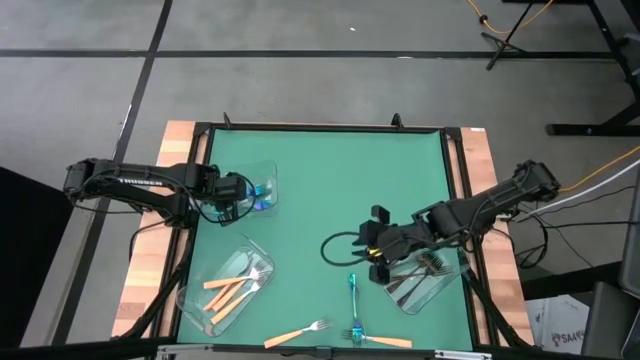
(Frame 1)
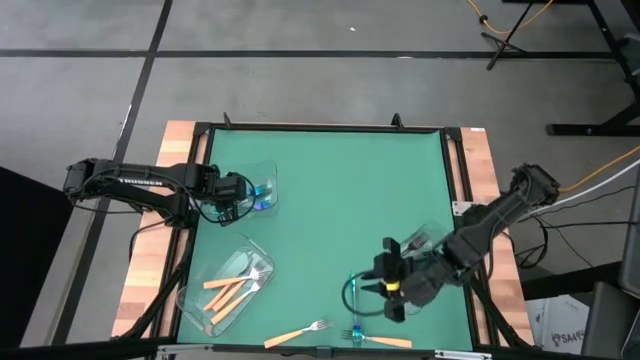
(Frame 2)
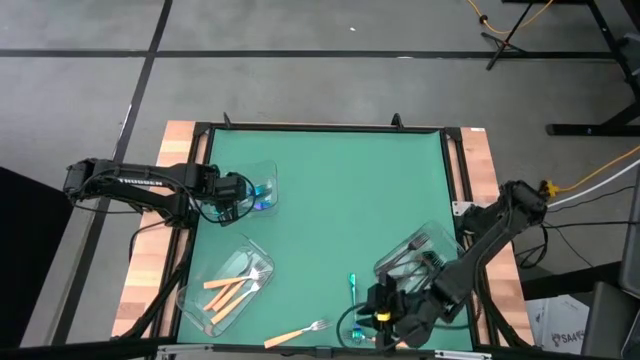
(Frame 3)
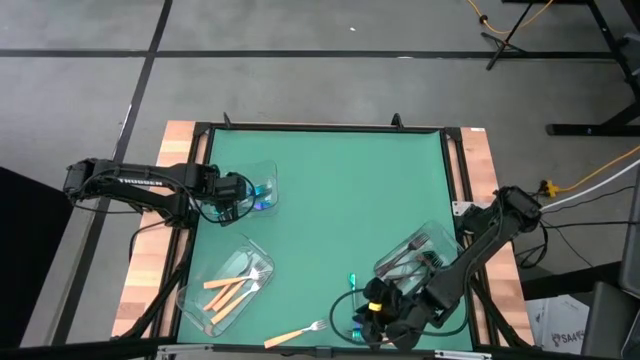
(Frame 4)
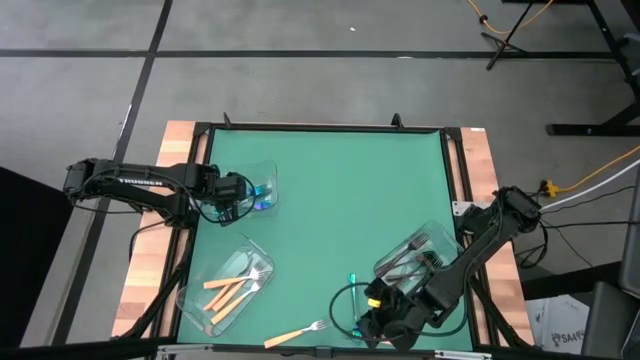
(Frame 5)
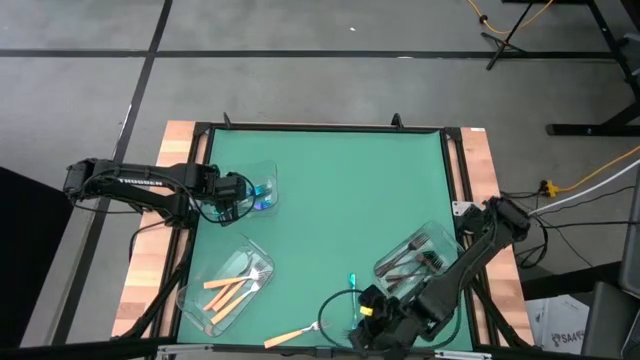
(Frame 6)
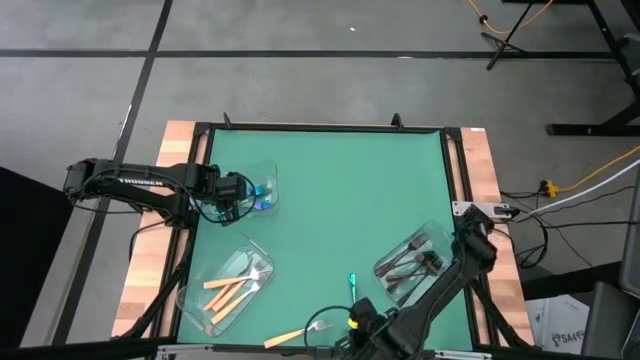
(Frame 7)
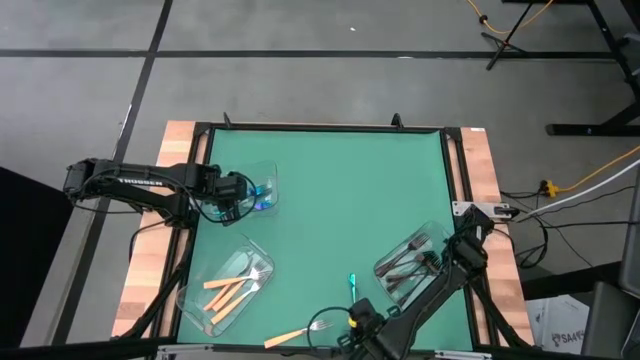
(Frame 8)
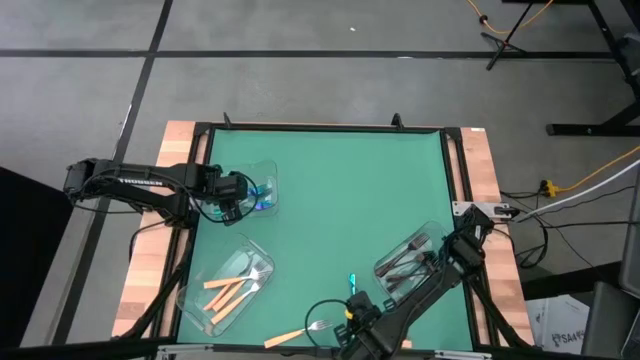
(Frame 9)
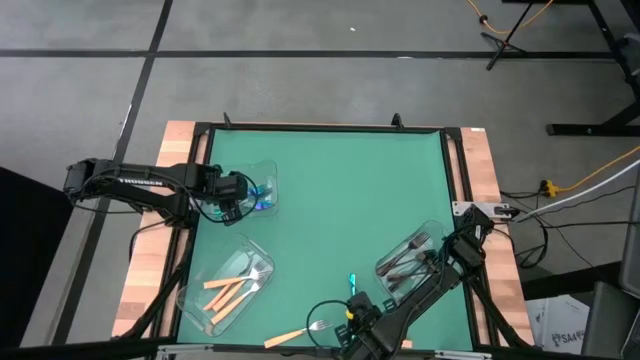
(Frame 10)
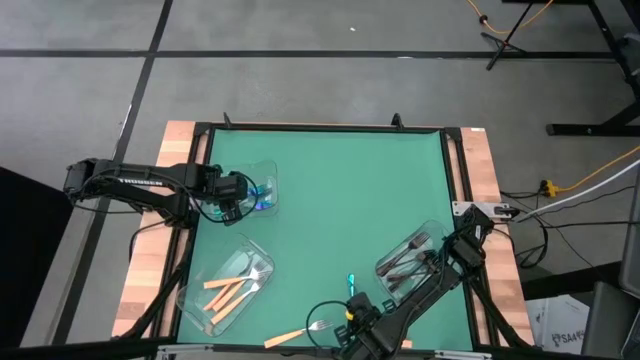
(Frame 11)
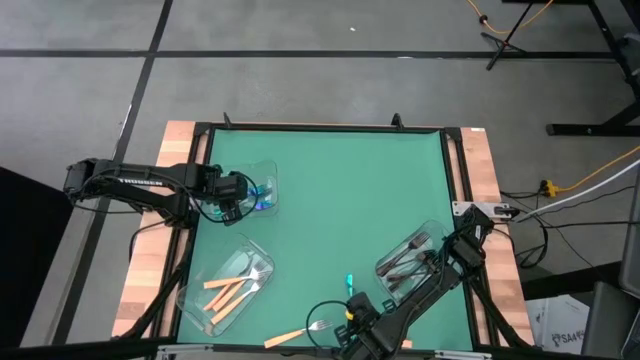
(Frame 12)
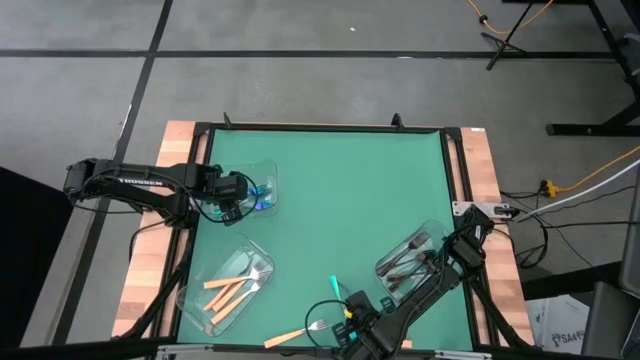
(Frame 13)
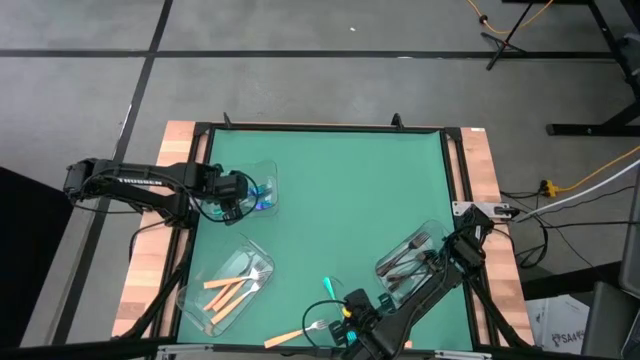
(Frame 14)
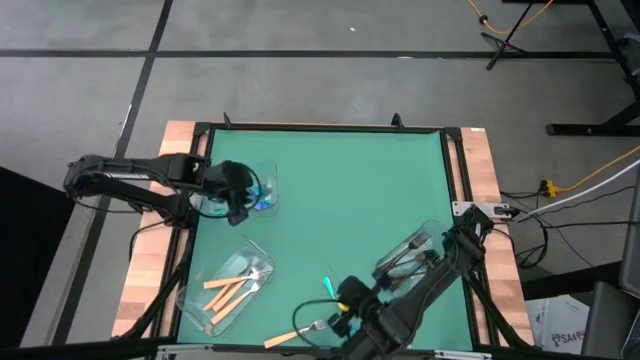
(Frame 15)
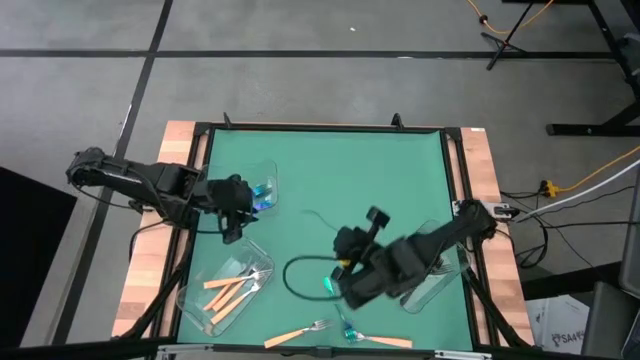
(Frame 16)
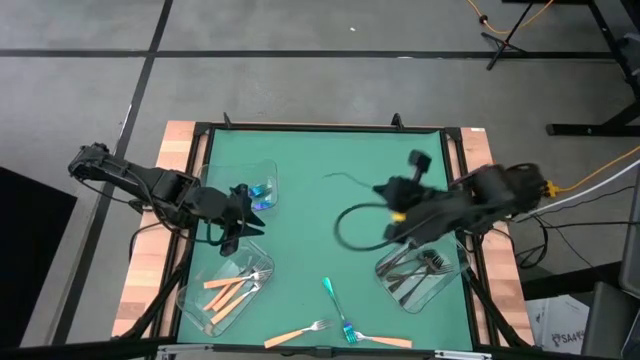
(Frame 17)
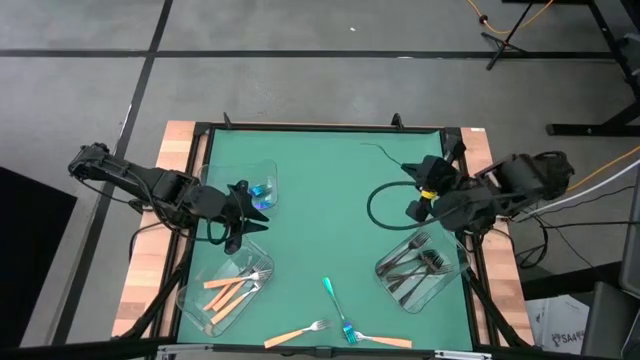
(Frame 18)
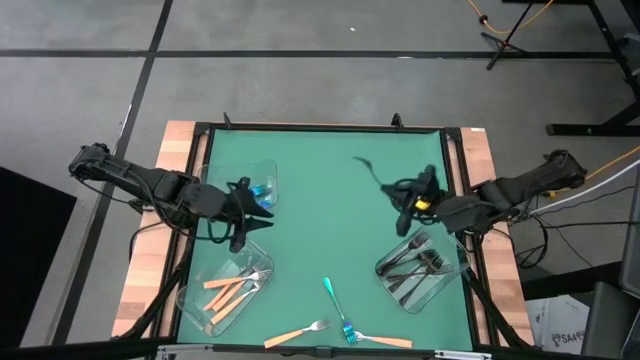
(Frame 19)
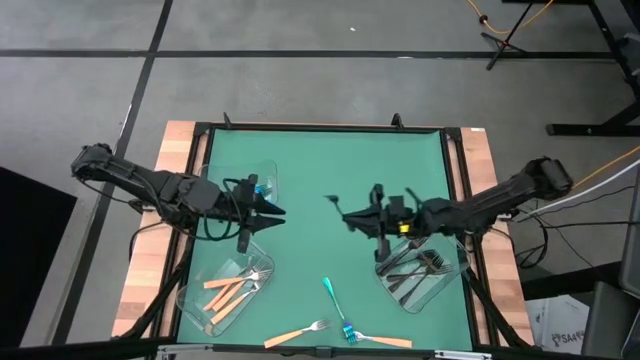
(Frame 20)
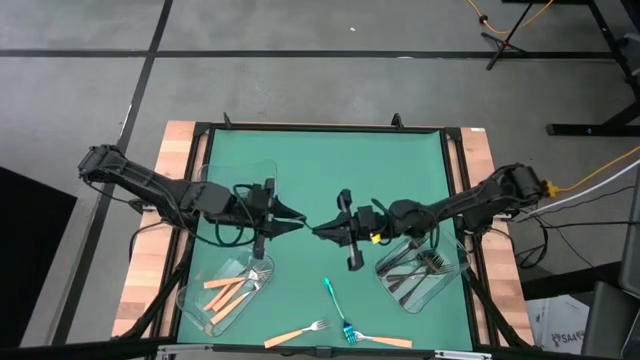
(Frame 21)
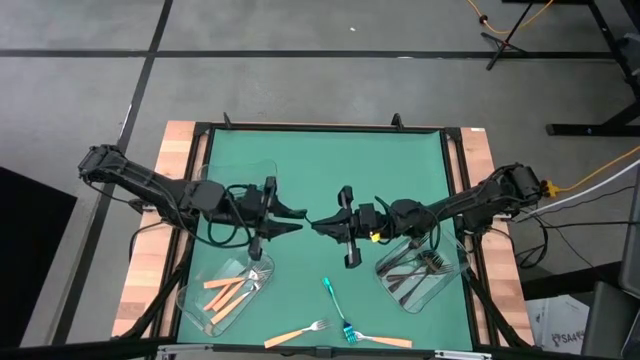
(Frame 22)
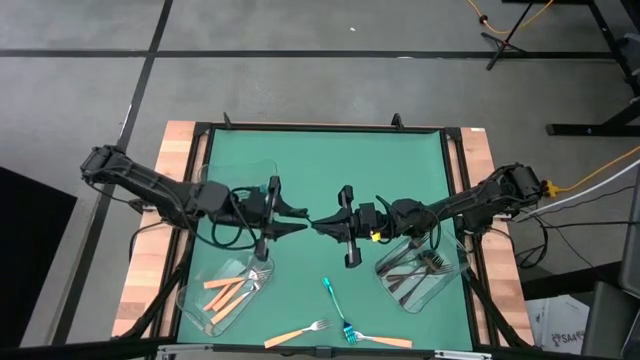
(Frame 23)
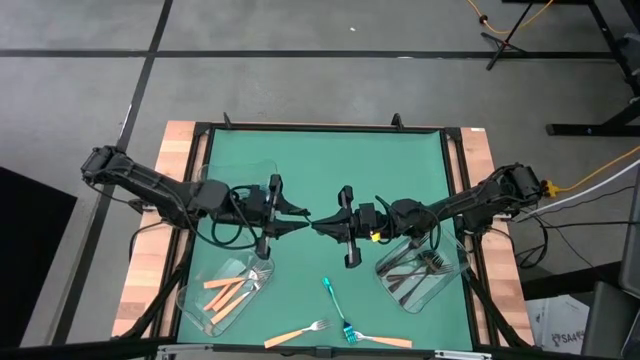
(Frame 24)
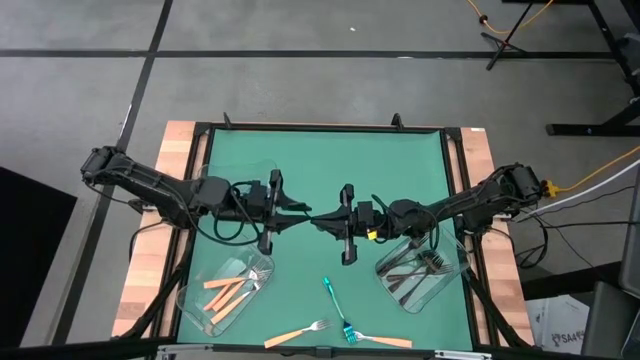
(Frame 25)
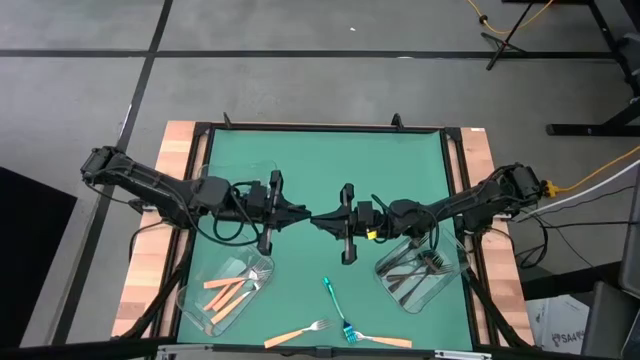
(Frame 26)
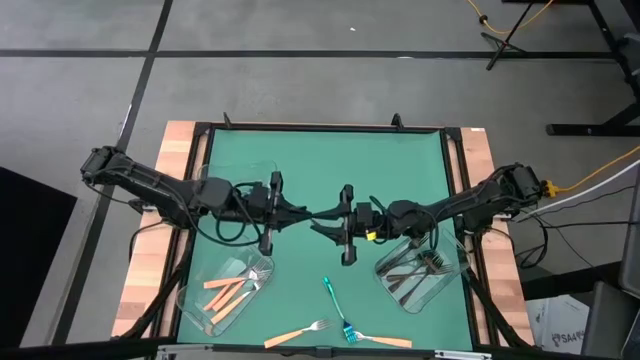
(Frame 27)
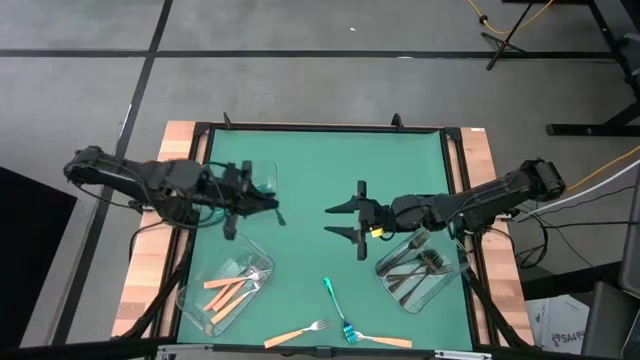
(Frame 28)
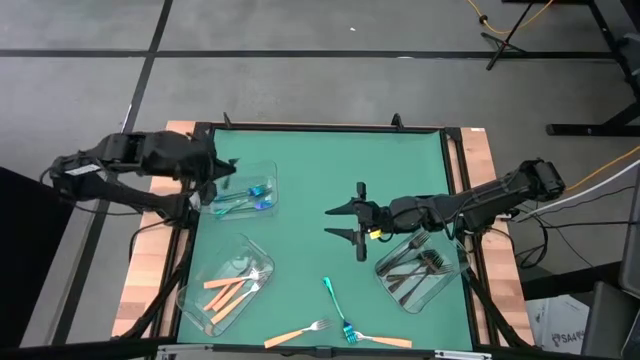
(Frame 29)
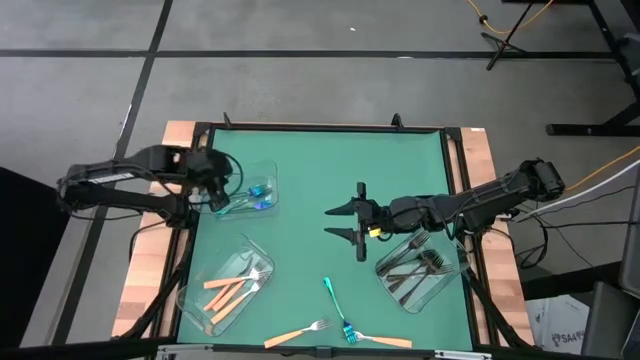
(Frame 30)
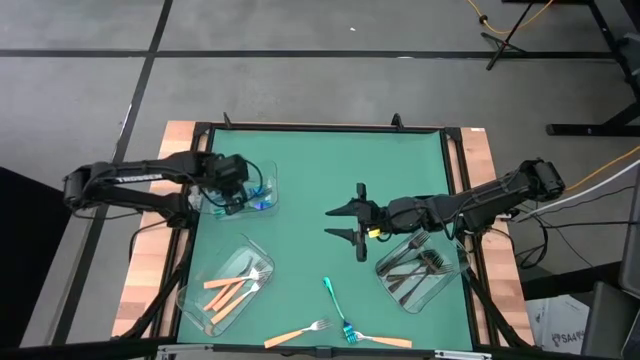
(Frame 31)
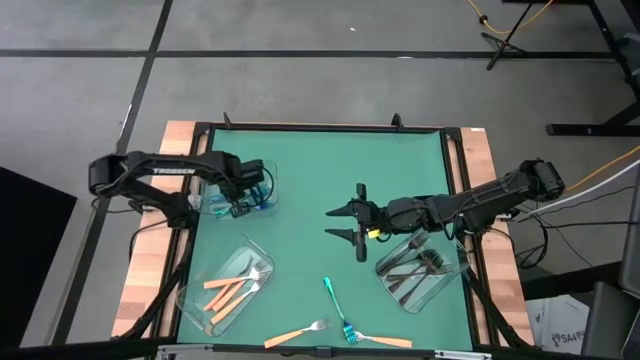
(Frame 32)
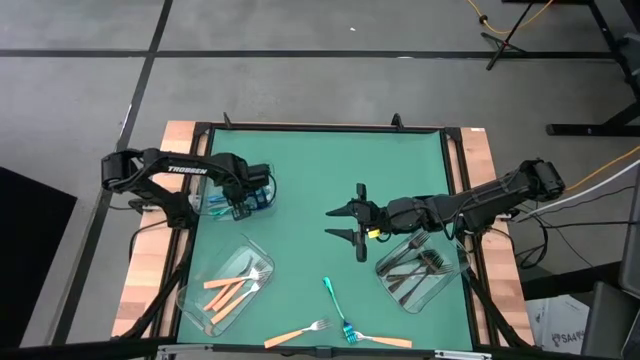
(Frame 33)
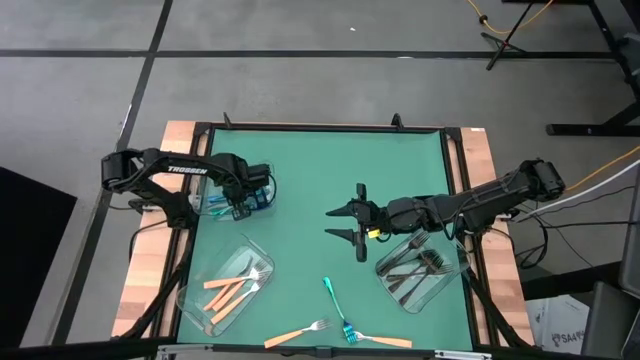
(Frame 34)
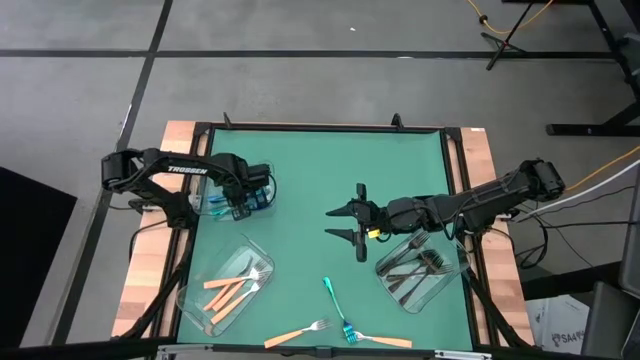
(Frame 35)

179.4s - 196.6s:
Task: Sort silverware by color (type)
Put the right blue fork into the top transparent bin
